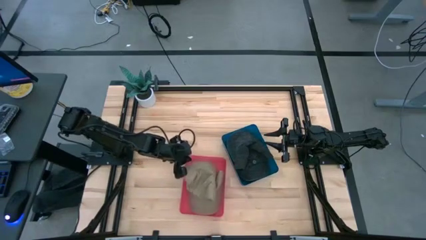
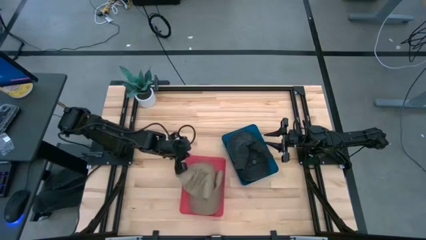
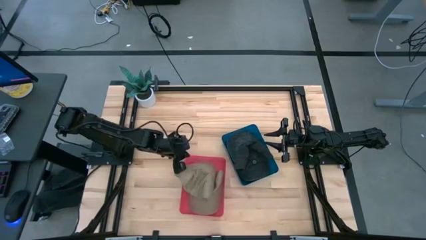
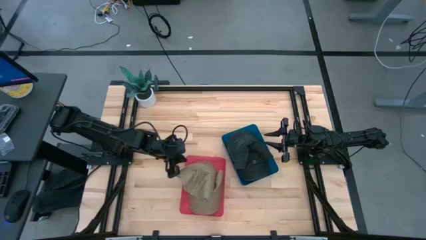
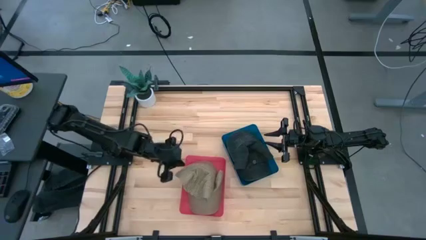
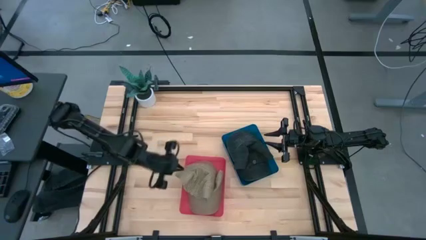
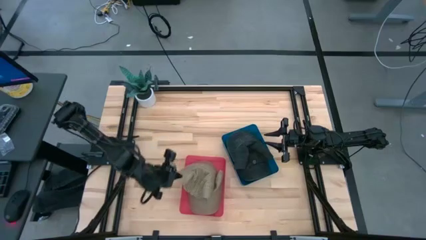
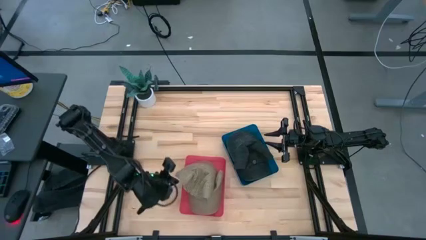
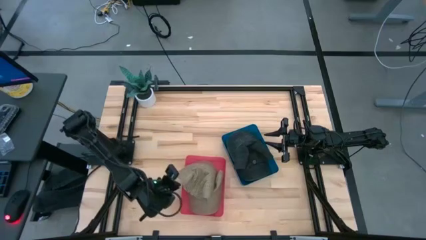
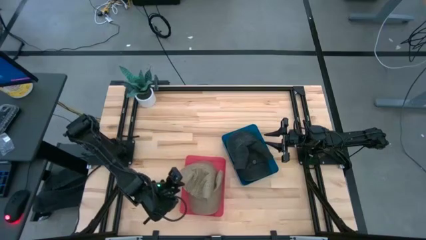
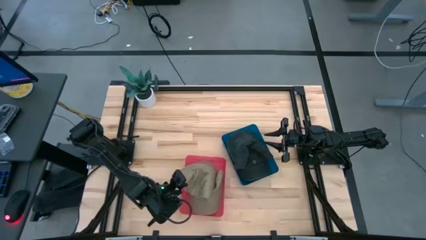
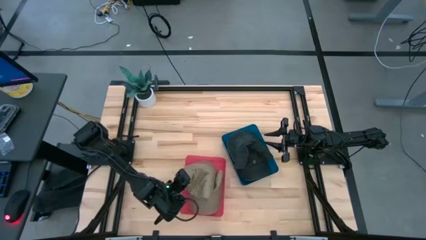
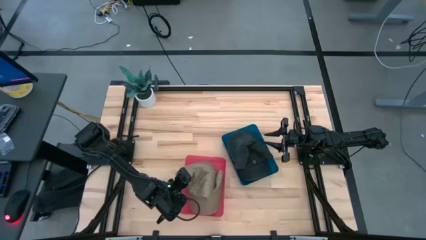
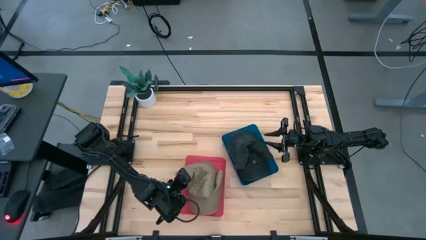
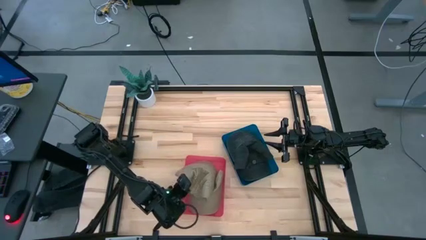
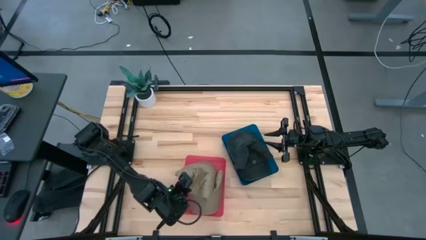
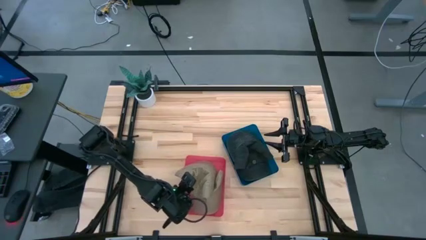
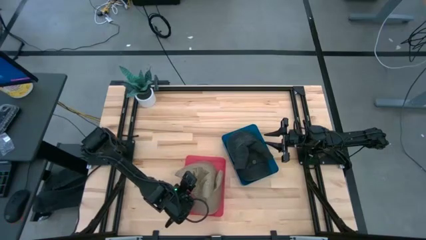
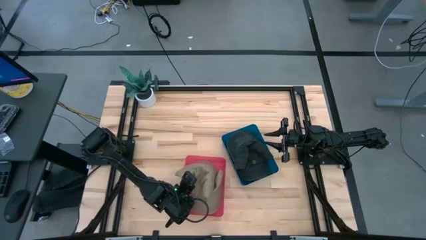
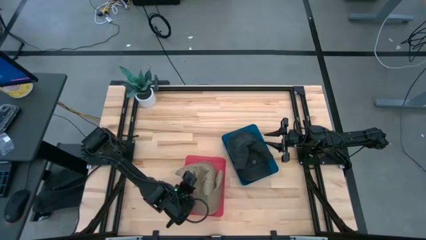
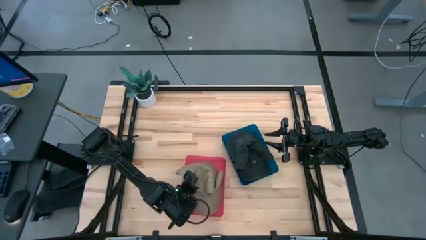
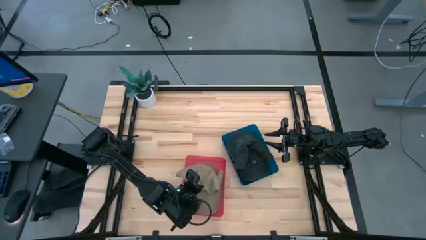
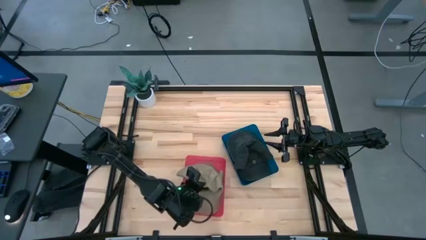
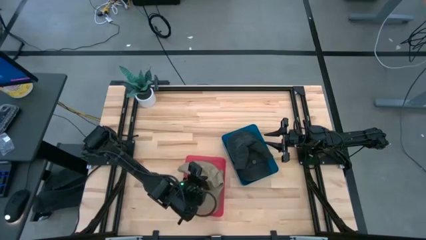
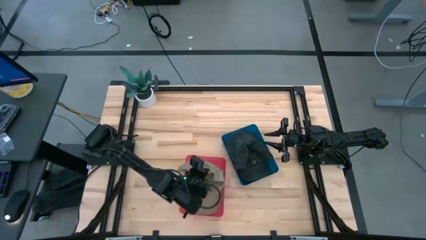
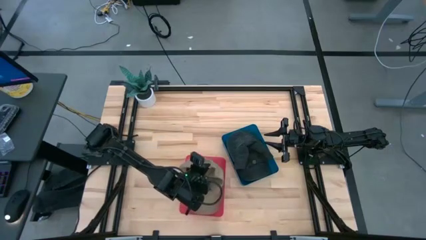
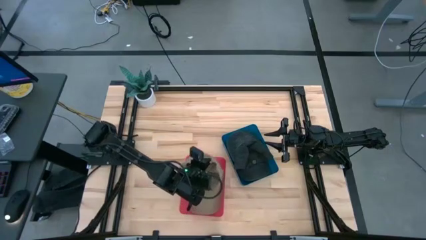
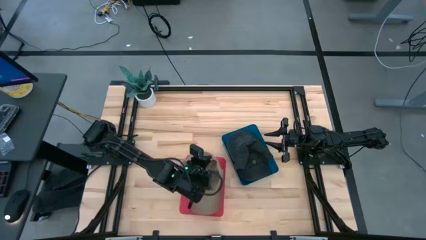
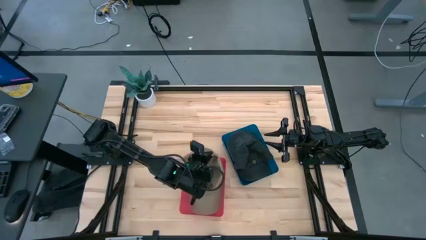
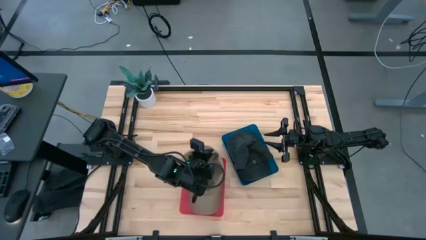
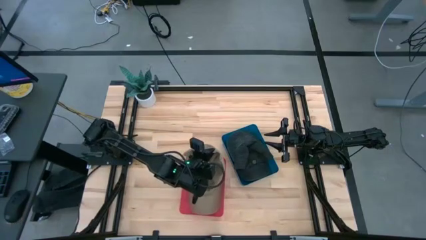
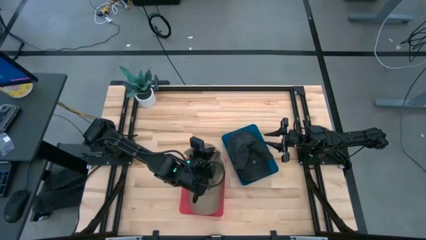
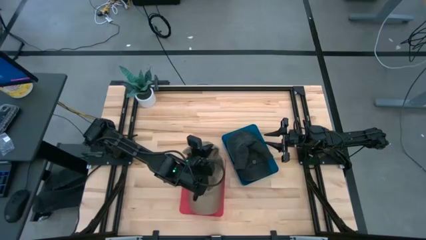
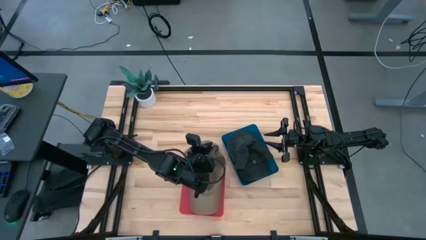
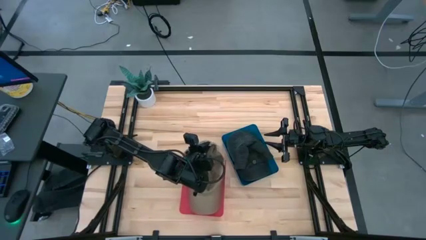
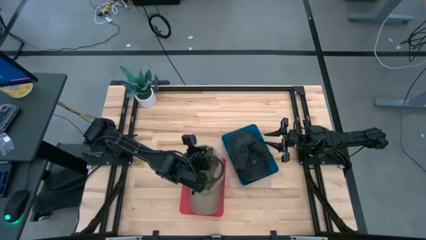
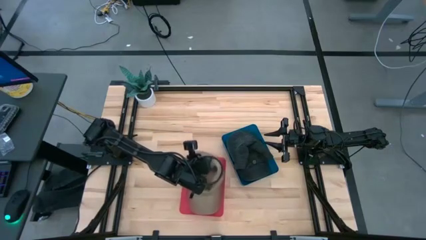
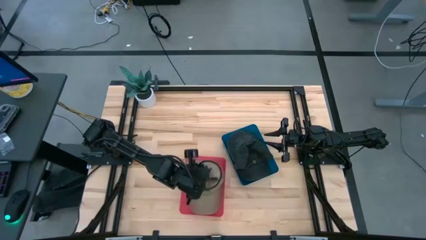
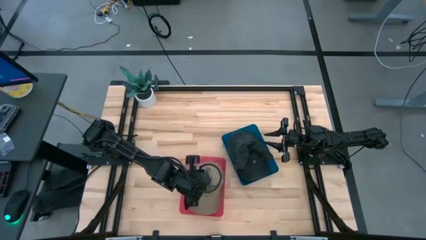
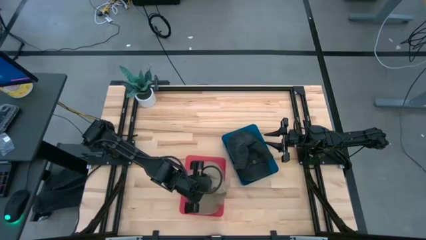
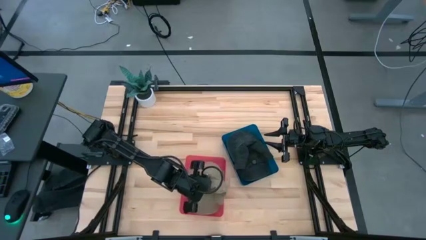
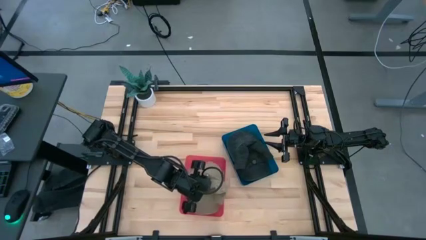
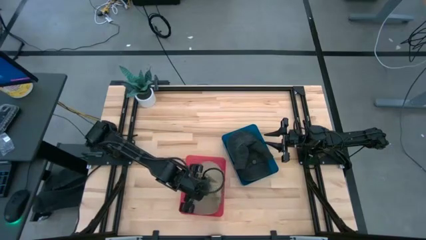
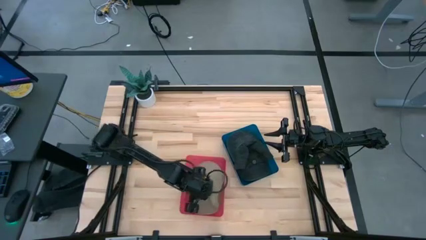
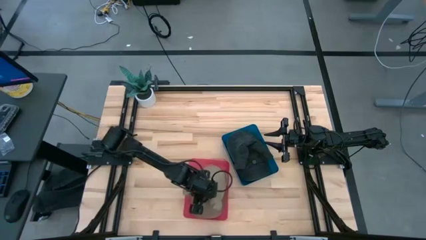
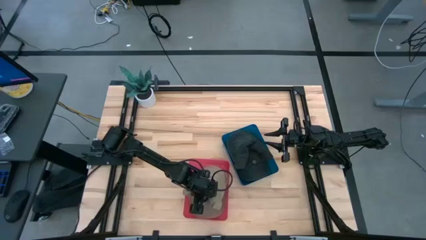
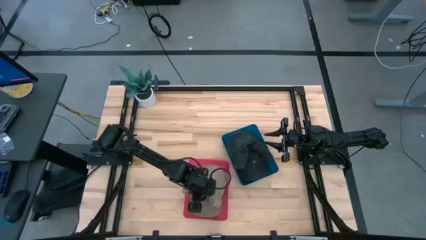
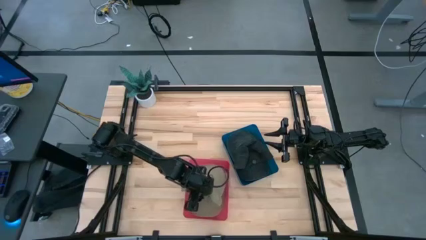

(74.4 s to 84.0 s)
Task: Pick & Place hat
Adjust the brown cap in the red bin

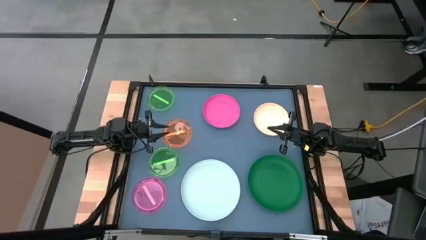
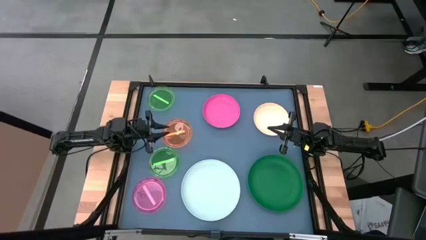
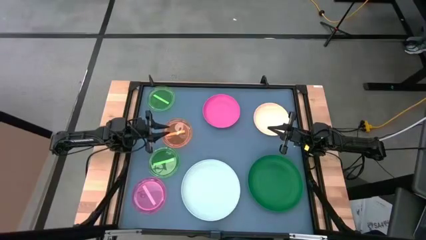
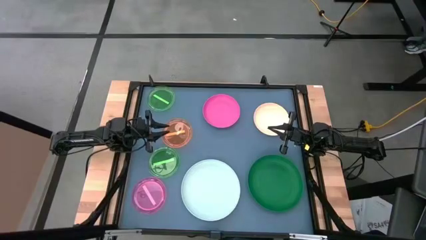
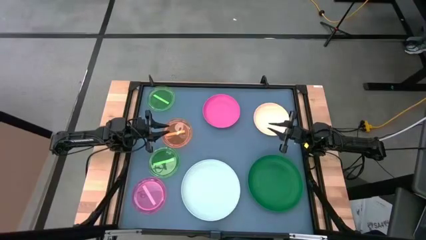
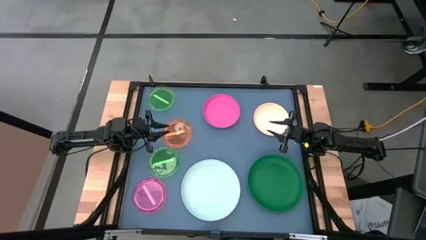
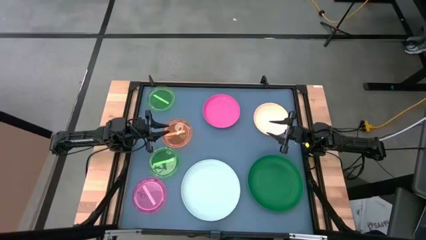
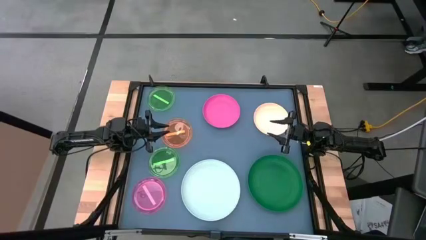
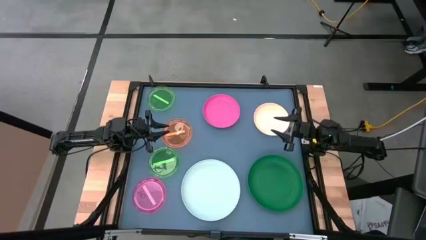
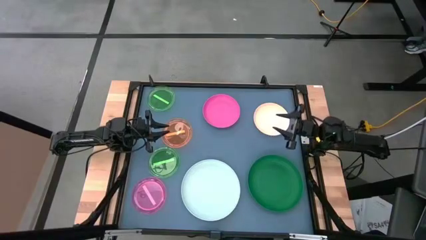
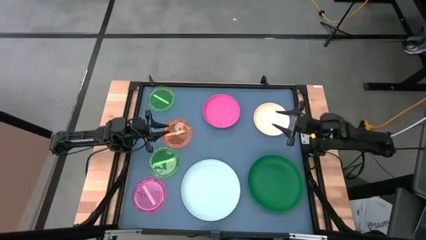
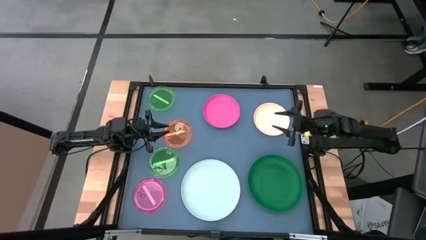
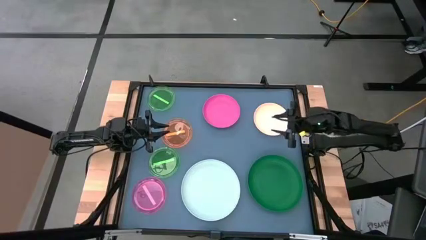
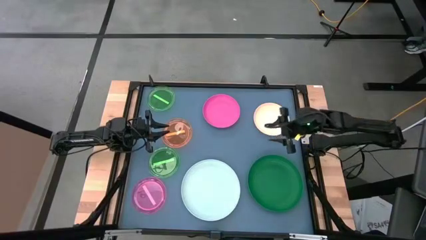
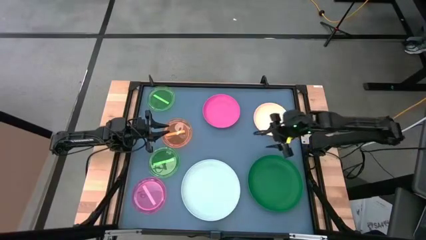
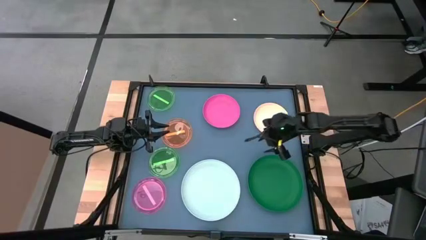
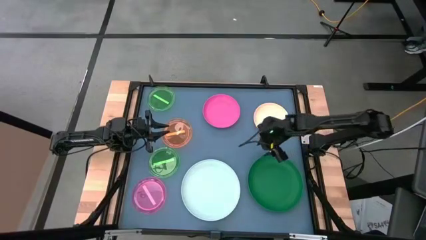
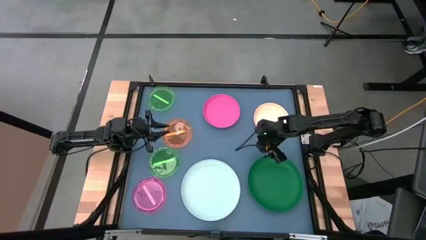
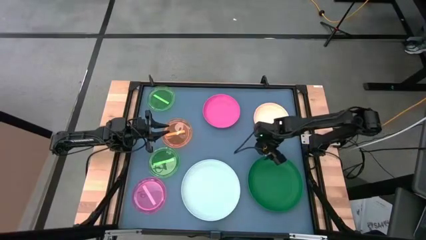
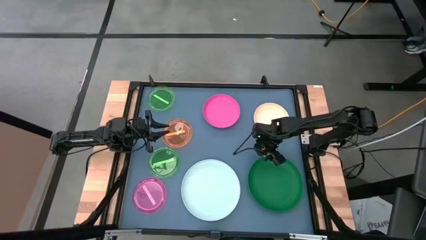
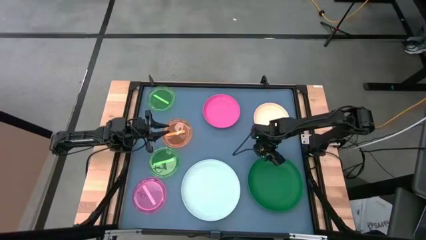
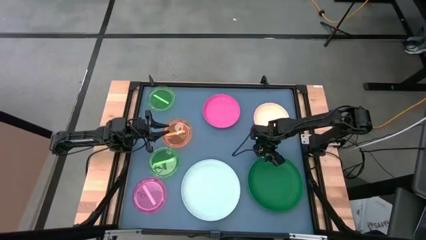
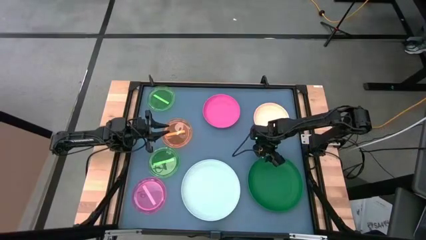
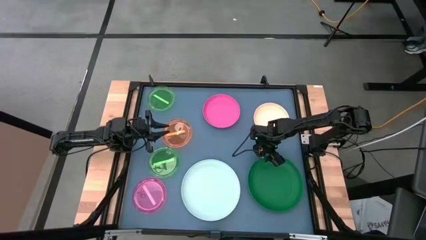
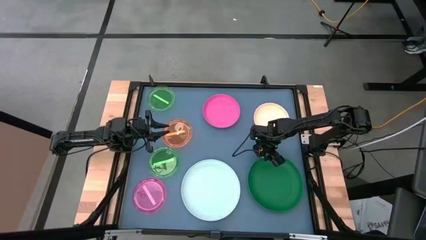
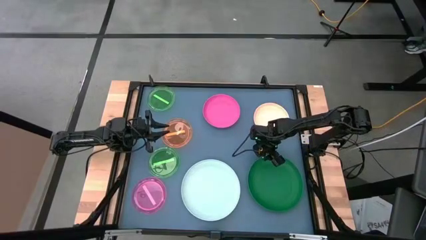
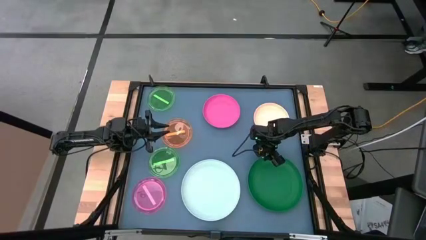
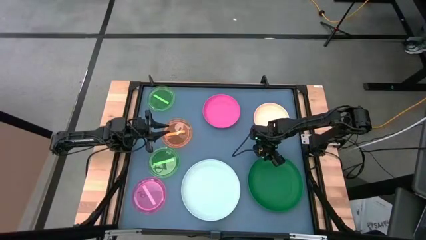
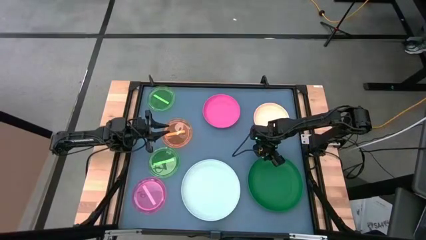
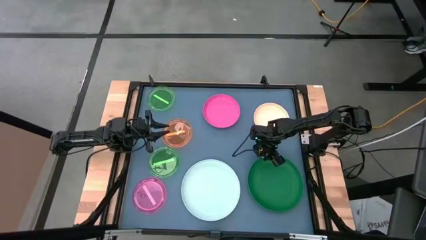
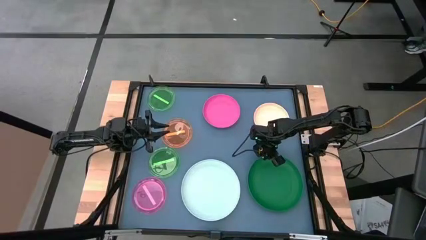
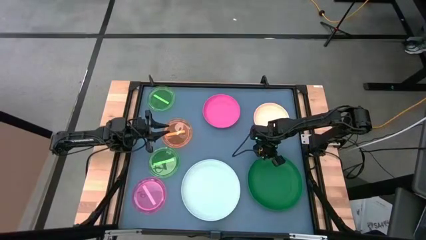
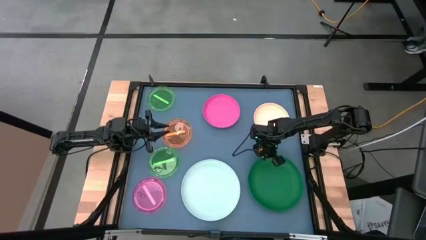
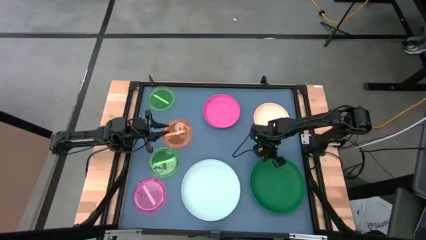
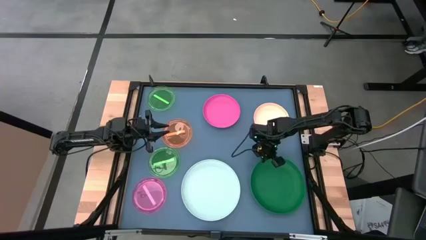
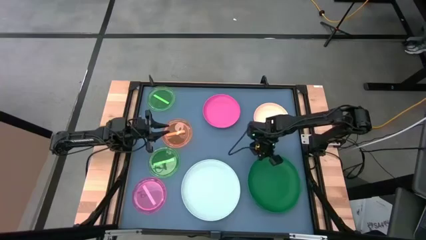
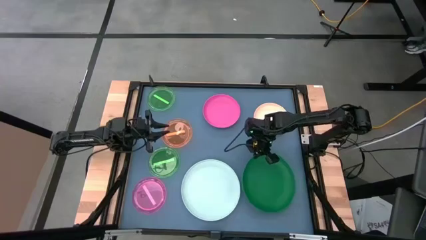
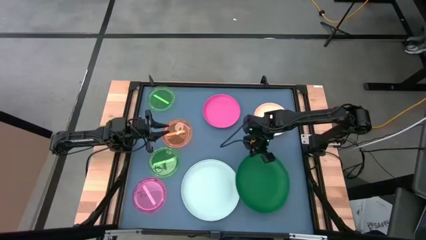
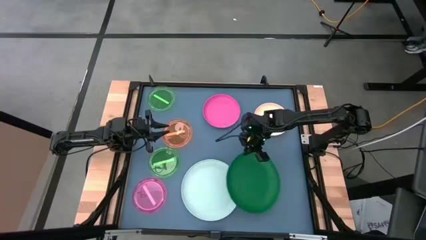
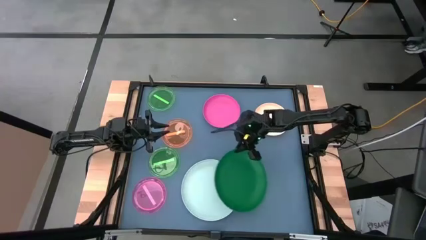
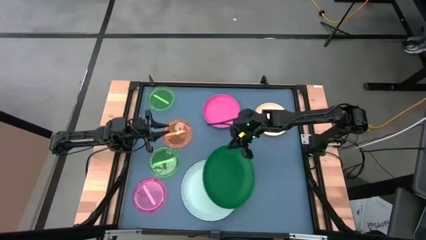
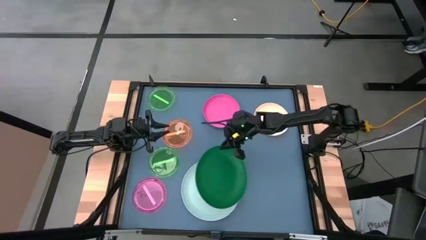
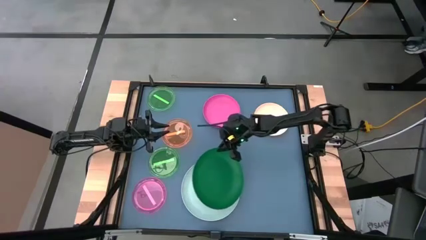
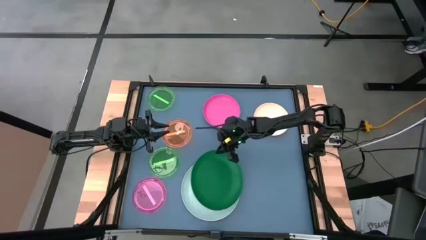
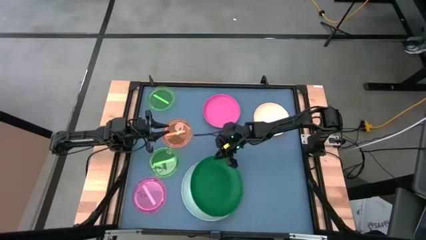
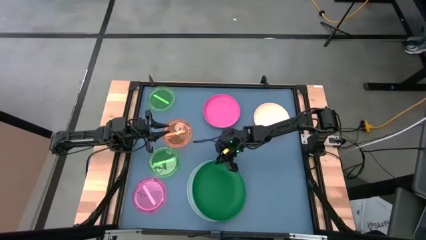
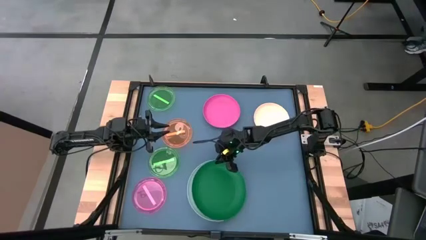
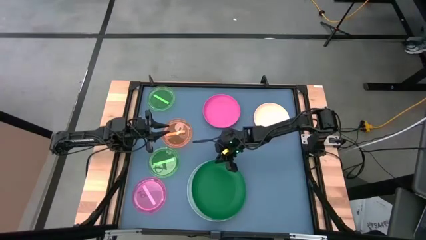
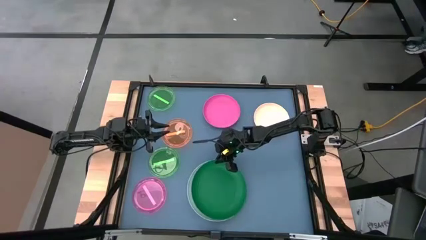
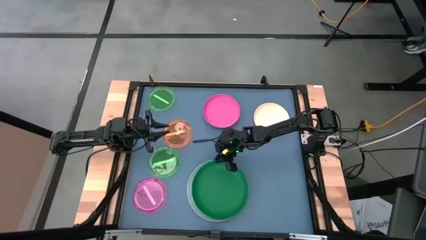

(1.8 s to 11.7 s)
Task: Stack plastic plates
Stack the green plate on the large light blue plate
